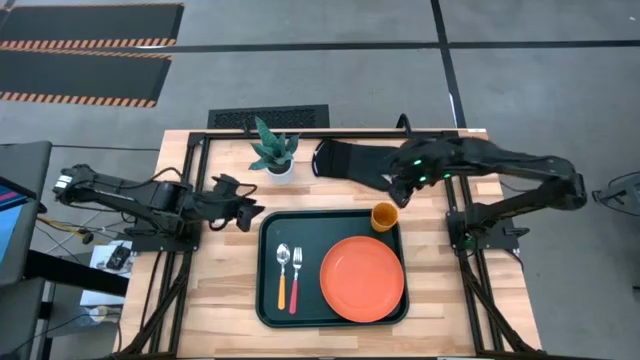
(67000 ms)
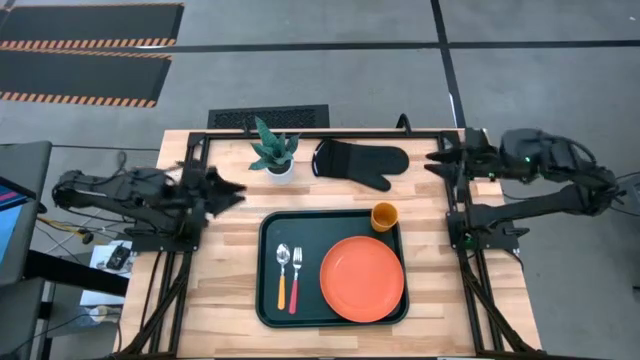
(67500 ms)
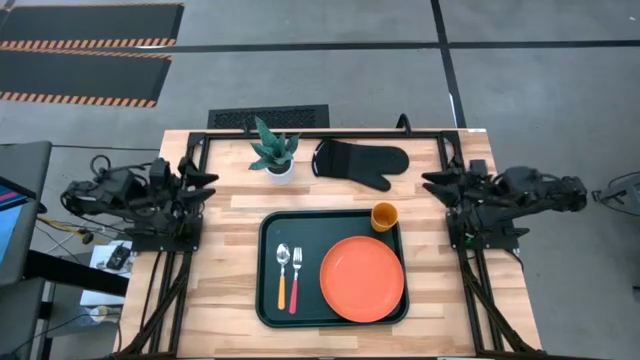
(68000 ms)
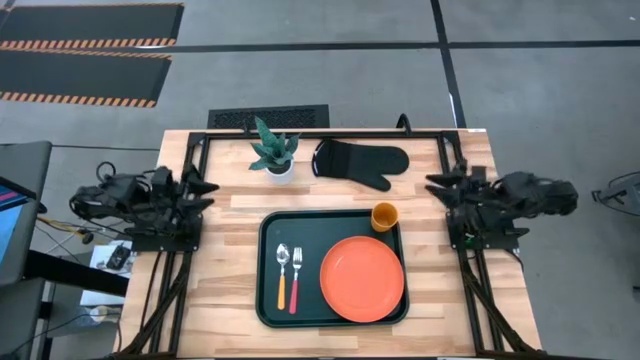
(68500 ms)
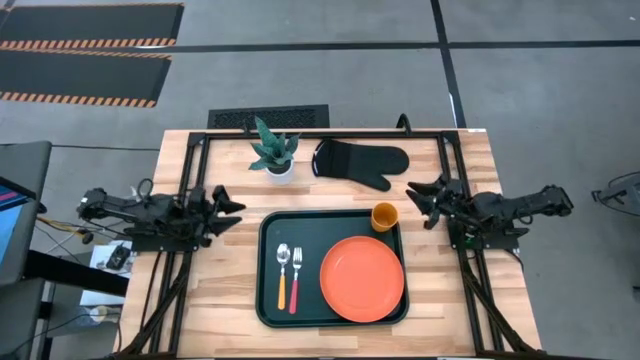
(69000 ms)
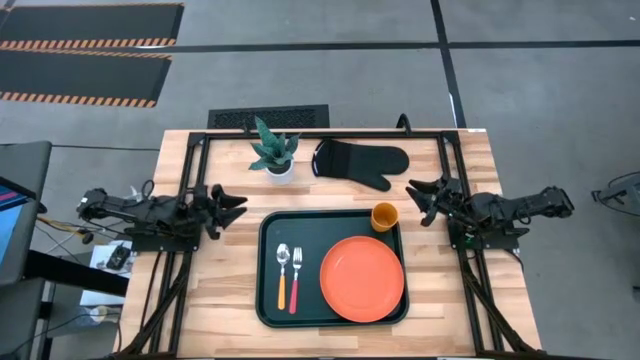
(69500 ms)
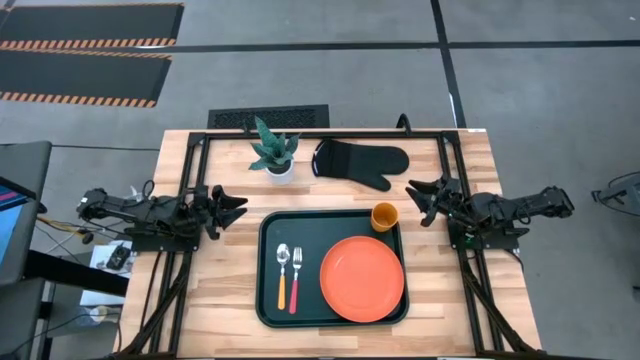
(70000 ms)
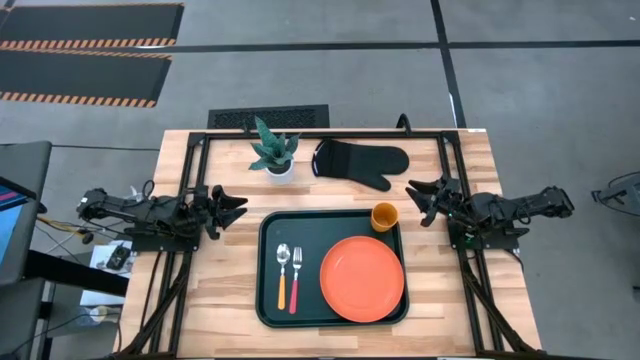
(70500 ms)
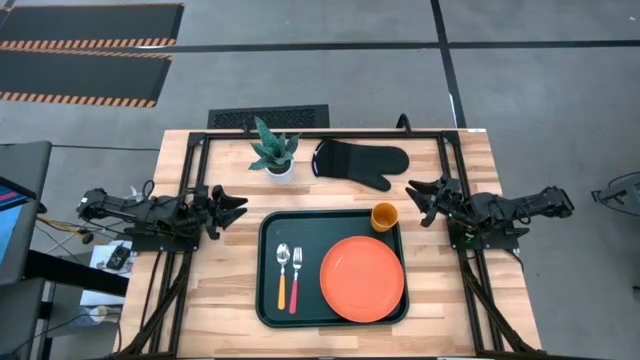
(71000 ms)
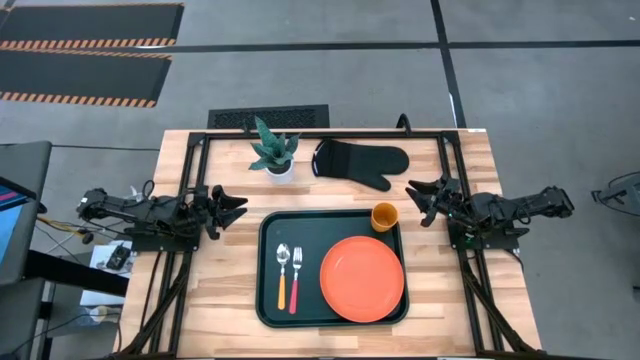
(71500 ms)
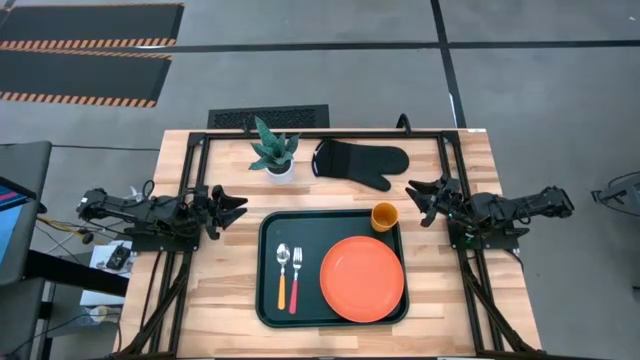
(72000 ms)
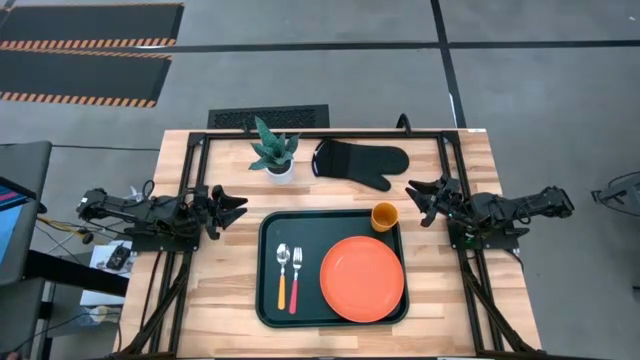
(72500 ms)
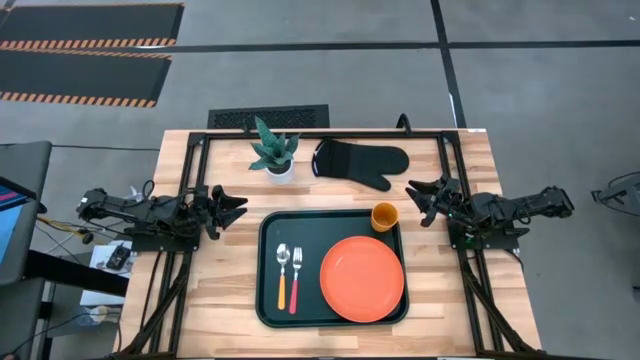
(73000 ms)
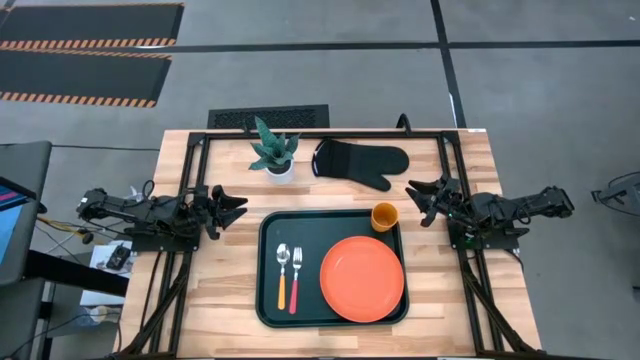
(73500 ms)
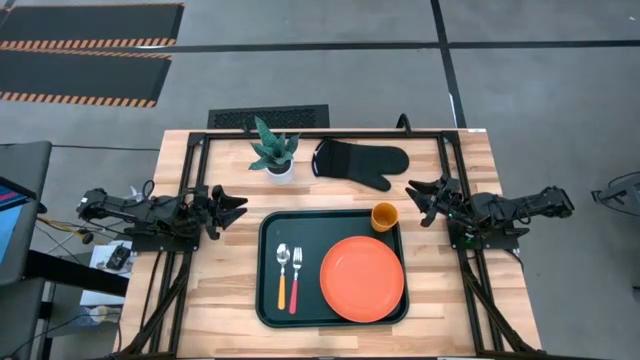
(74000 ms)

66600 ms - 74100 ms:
Task: Pick and place plate/cup/fork/spoon on tray
Return to Home Position

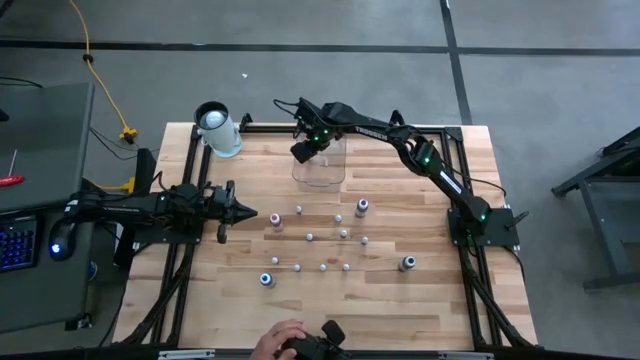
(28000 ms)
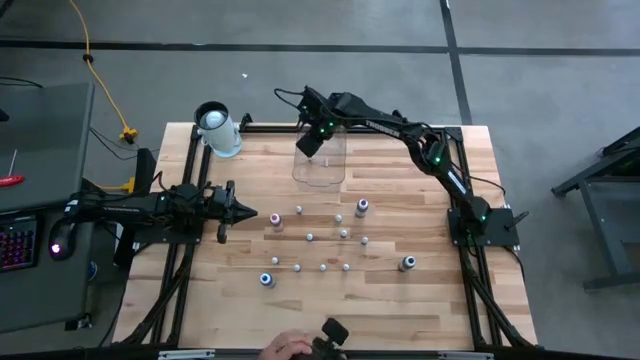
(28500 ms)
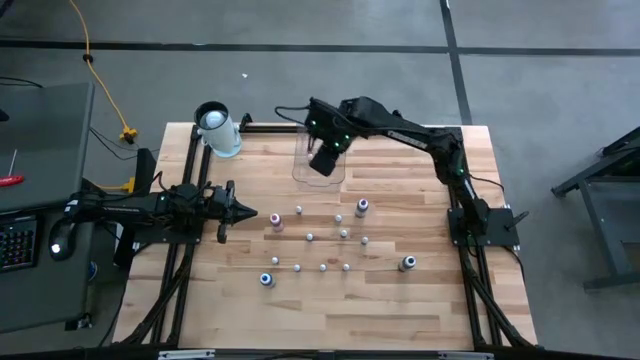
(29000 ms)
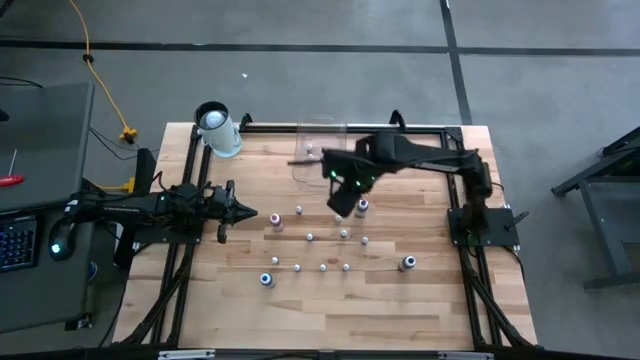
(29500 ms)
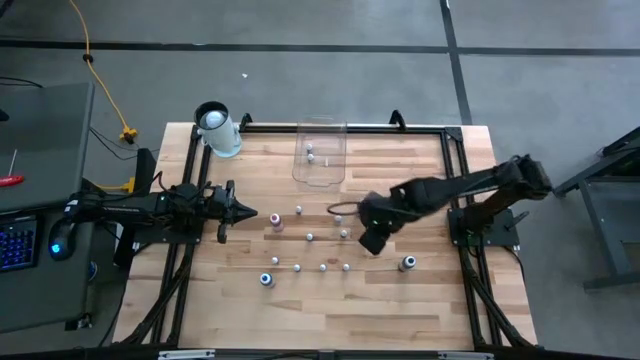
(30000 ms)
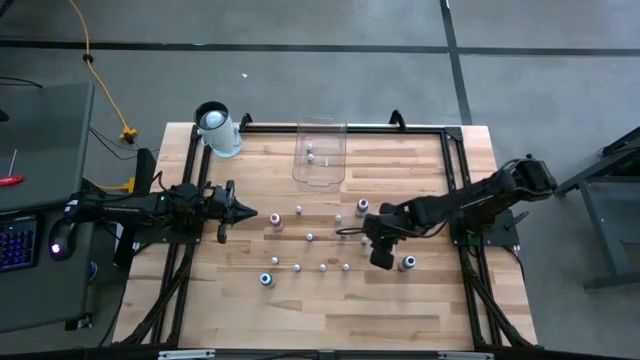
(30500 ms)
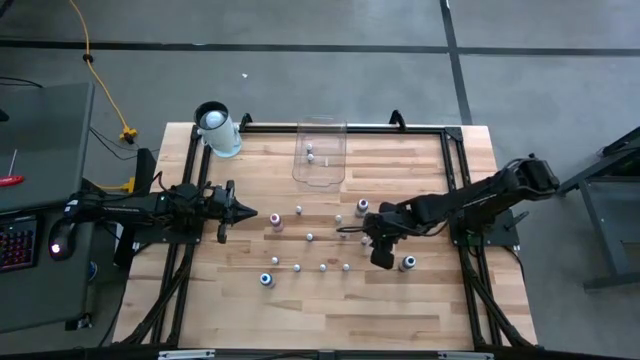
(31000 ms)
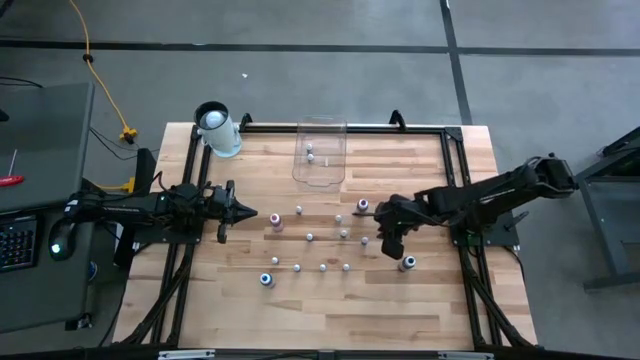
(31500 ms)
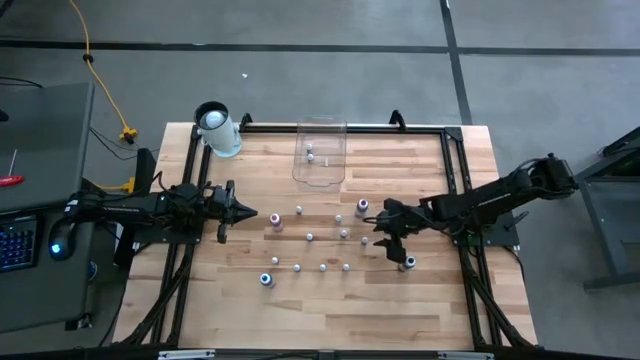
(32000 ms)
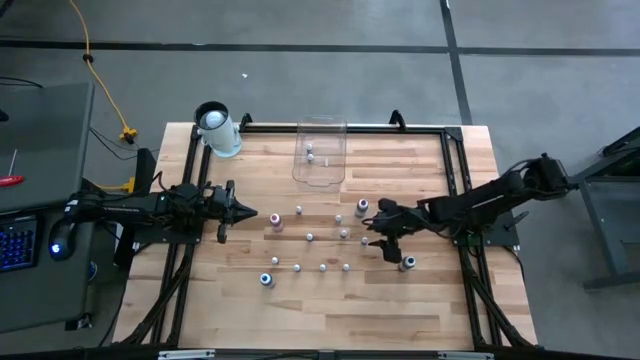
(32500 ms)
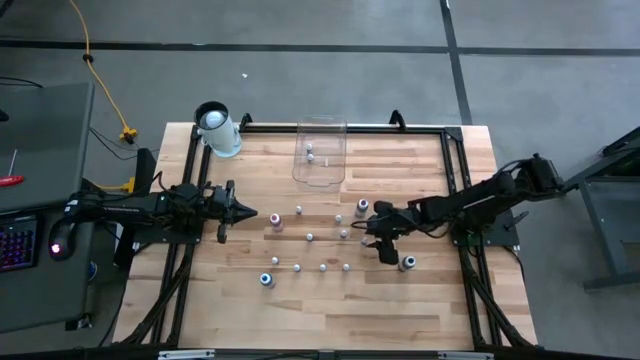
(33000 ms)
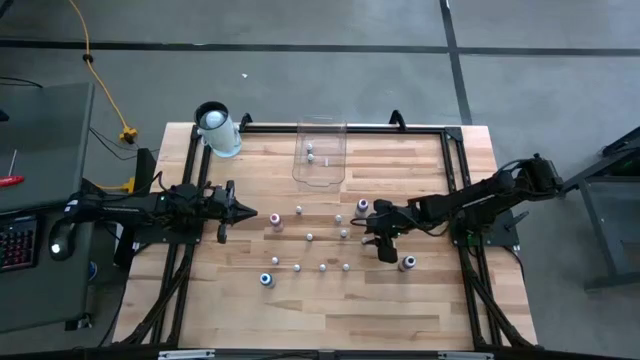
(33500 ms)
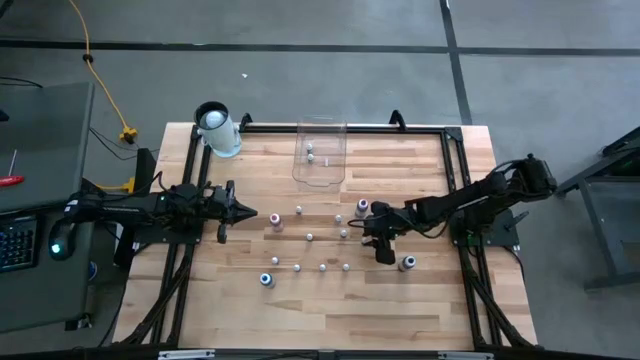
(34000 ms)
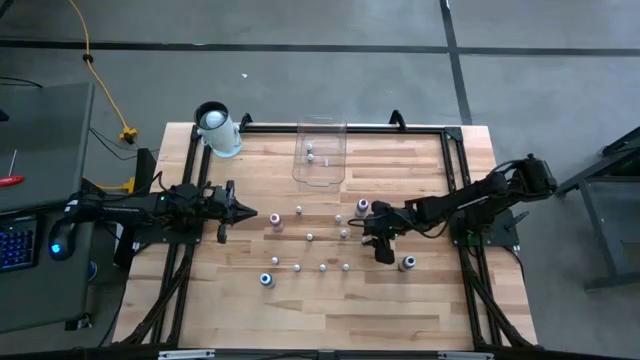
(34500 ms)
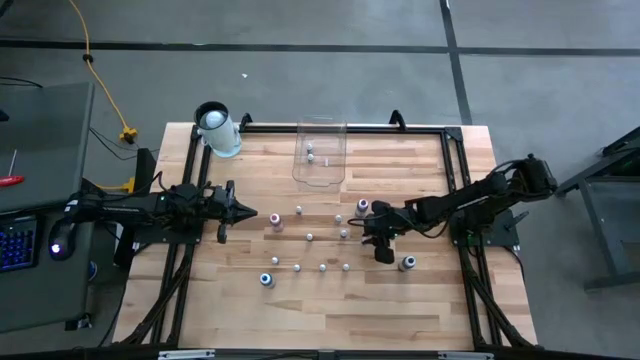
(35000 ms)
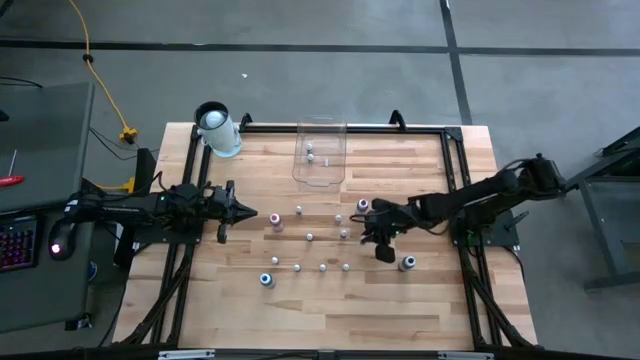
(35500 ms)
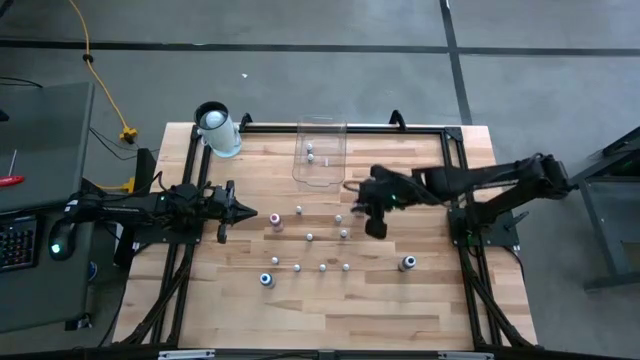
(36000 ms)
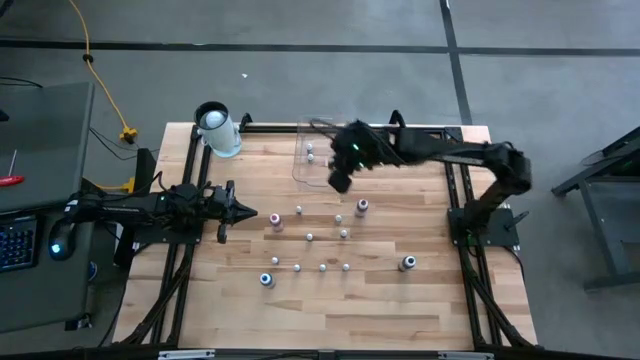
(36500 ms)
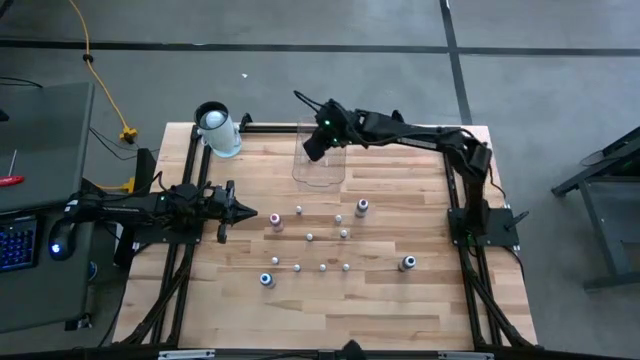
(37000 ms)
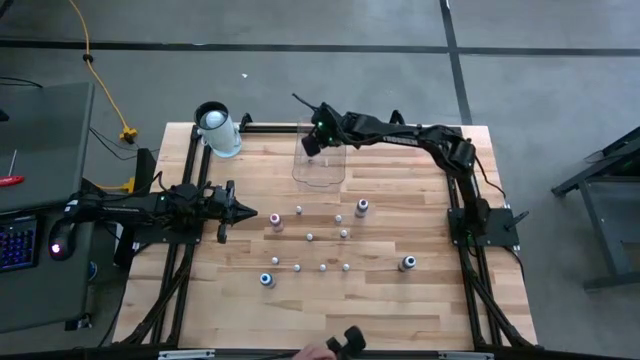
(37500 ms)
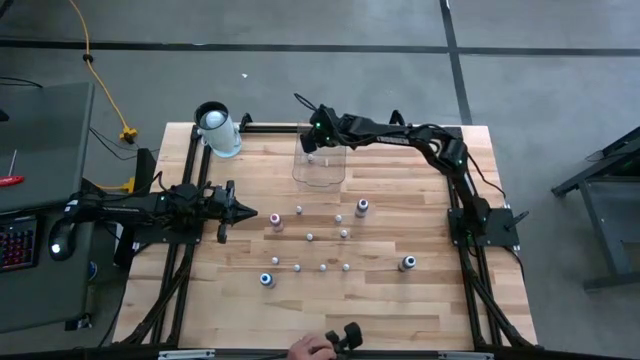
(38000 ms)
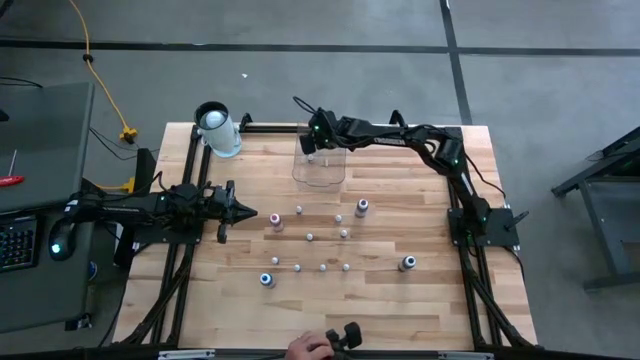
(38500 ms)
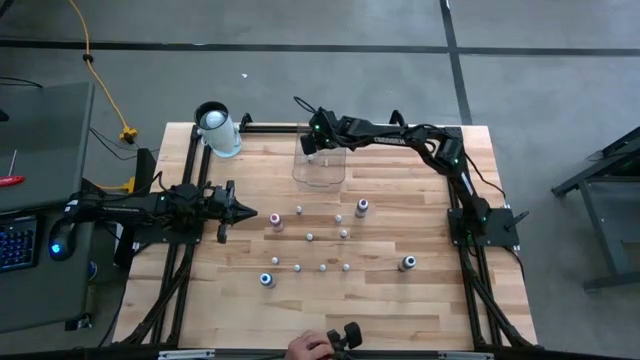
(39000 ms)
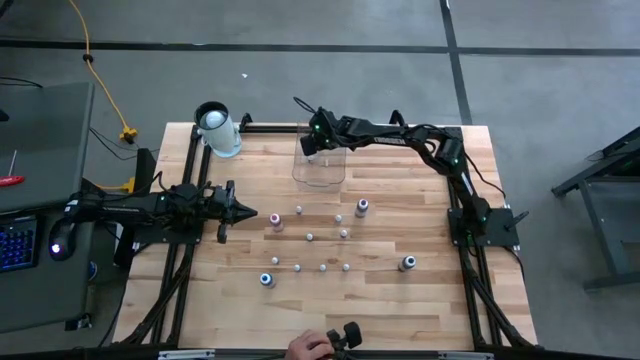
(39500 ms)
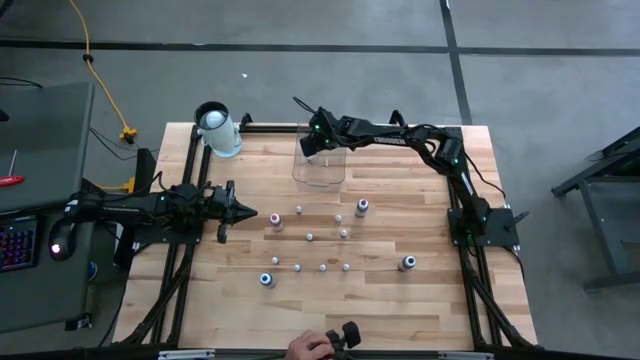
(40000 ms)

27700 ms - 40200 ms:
Task: Pick & Place food coloring
Put the small blue food coloring bottle into the container
